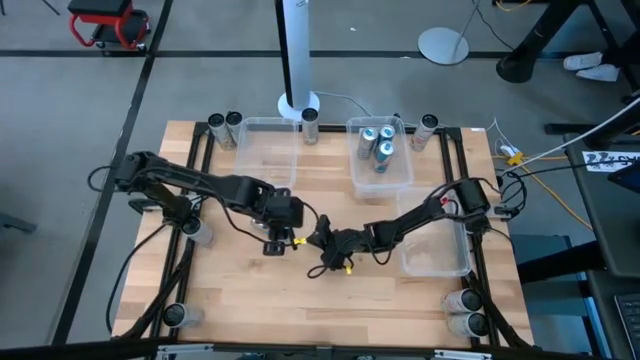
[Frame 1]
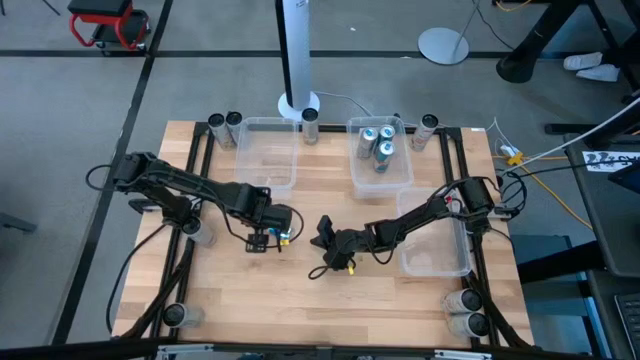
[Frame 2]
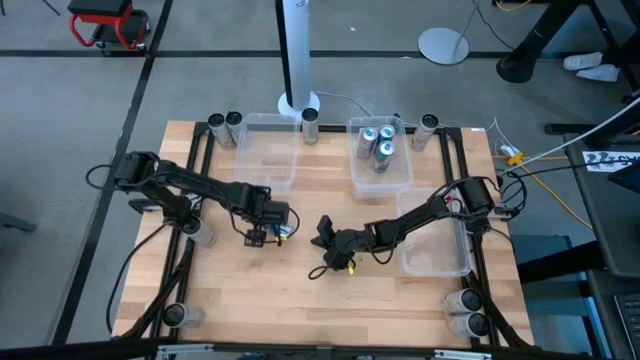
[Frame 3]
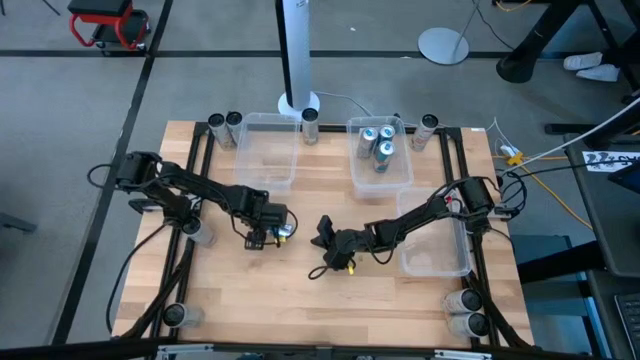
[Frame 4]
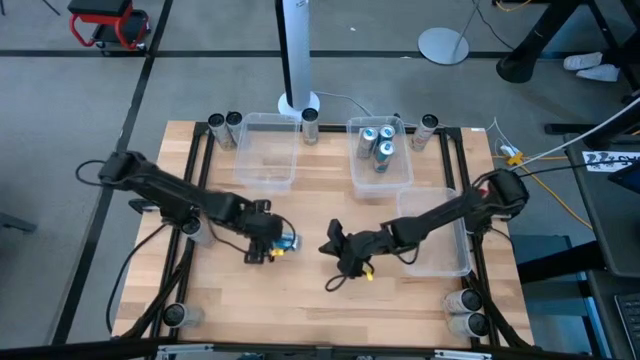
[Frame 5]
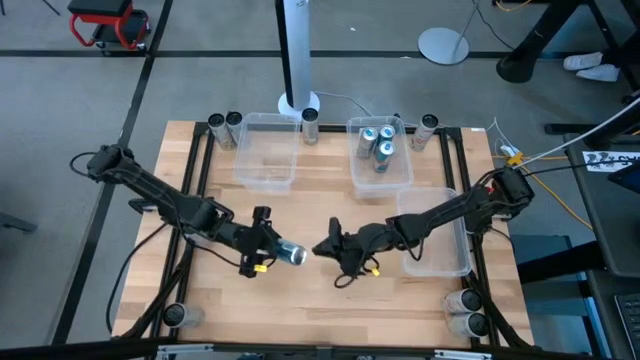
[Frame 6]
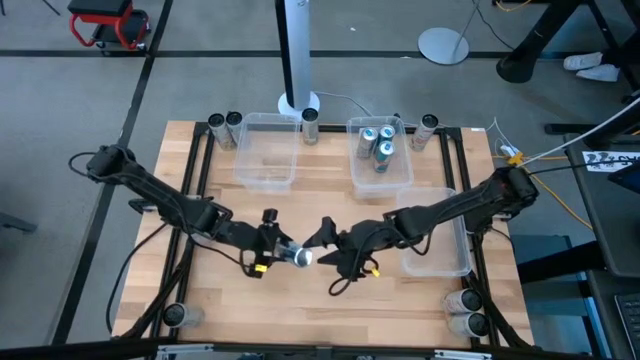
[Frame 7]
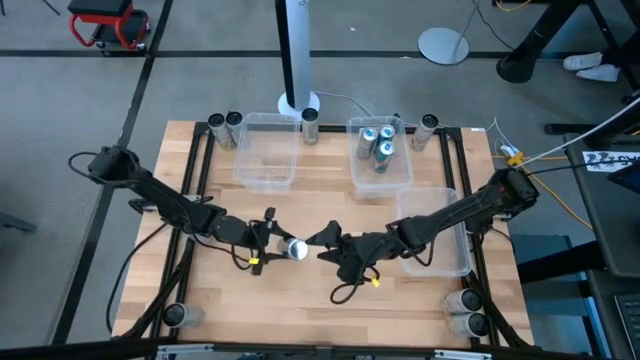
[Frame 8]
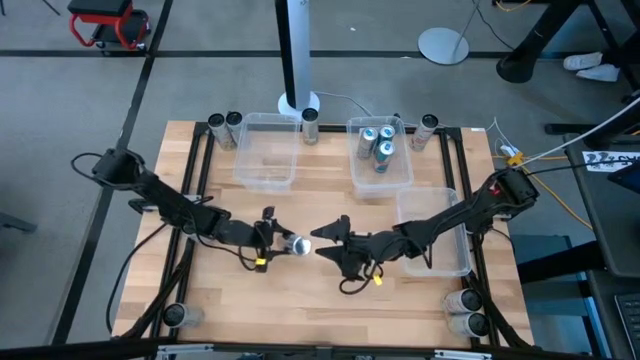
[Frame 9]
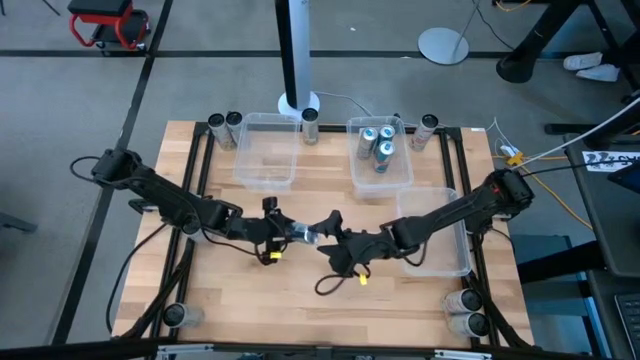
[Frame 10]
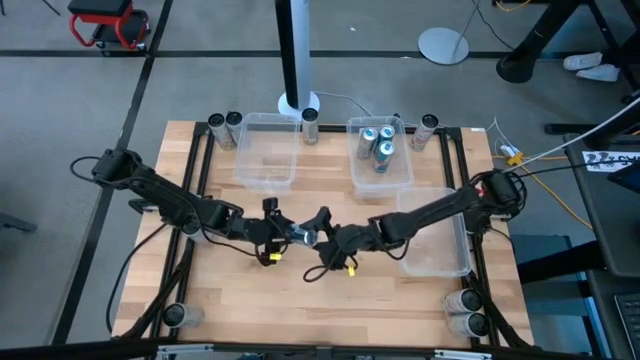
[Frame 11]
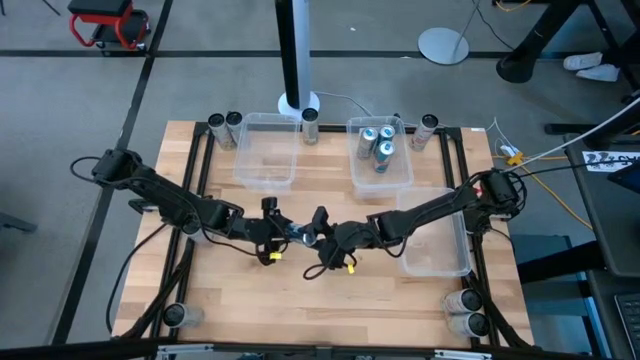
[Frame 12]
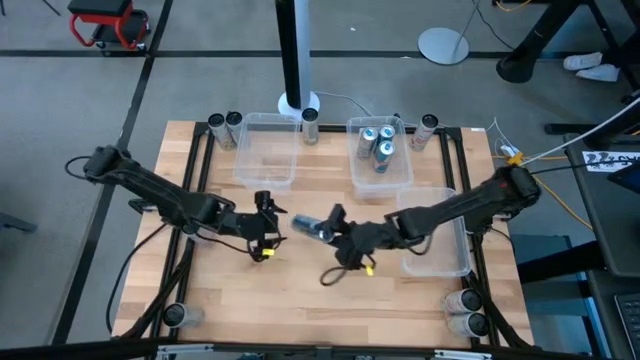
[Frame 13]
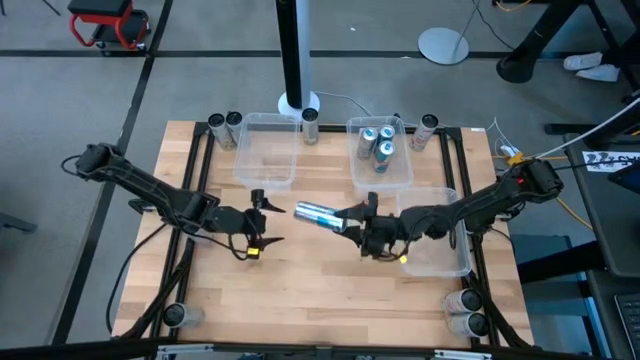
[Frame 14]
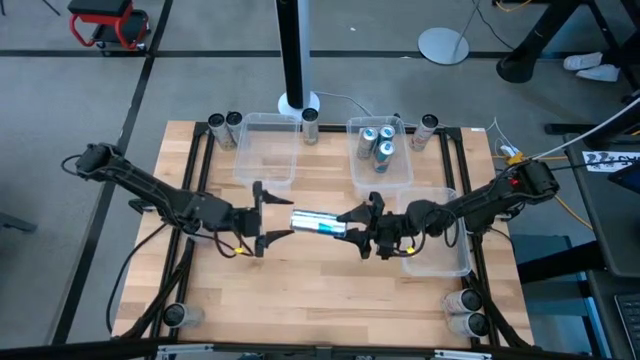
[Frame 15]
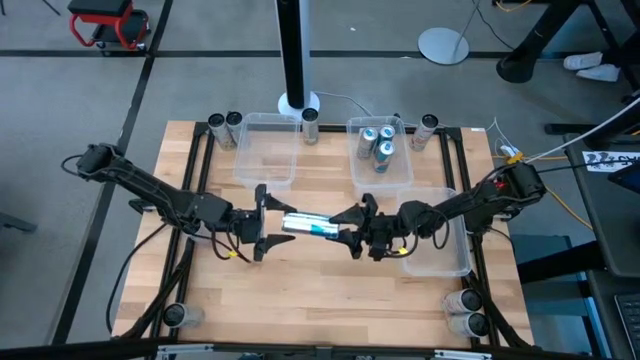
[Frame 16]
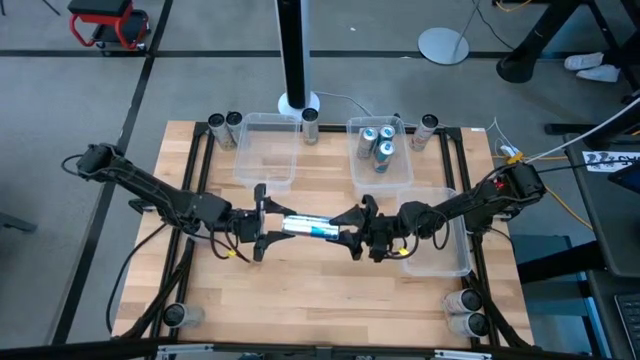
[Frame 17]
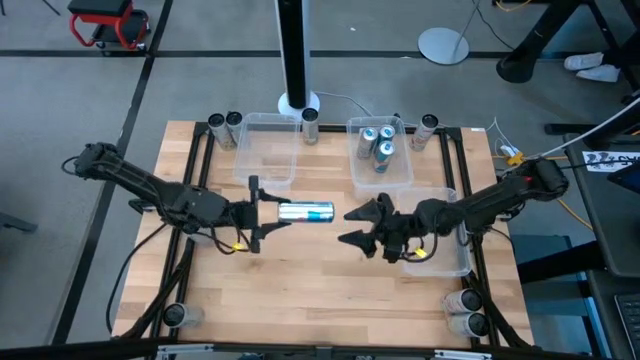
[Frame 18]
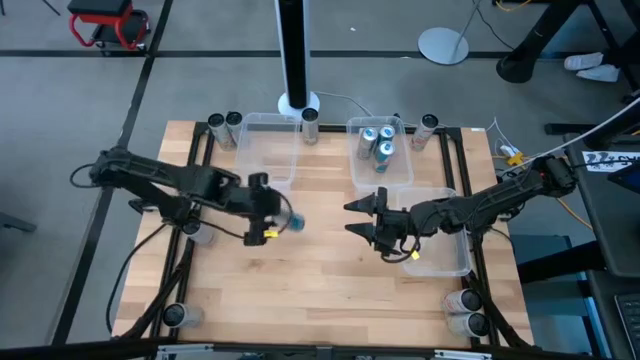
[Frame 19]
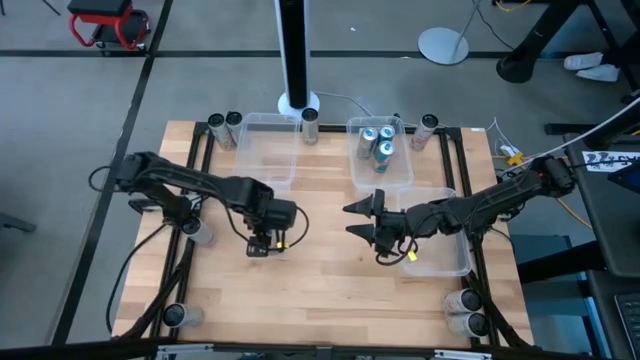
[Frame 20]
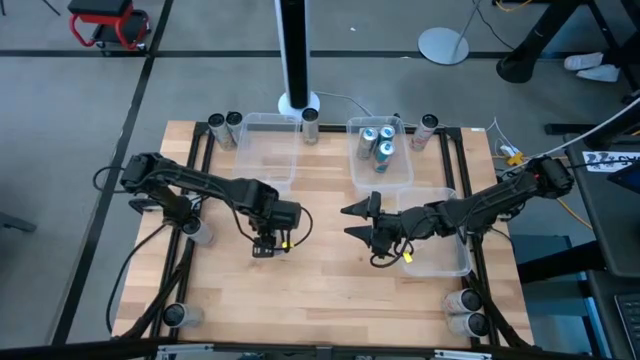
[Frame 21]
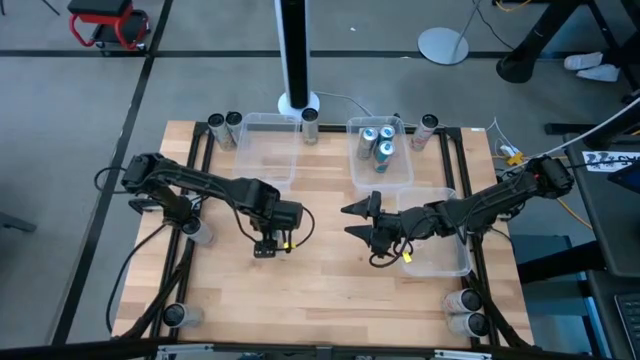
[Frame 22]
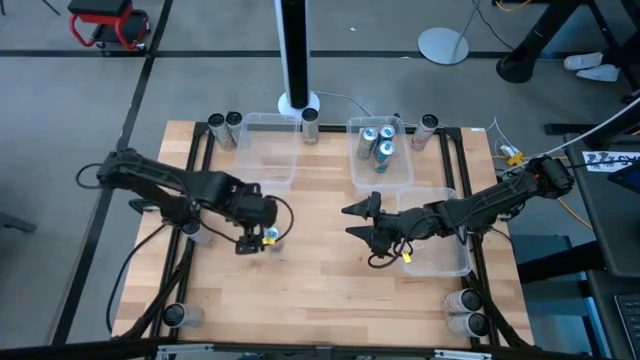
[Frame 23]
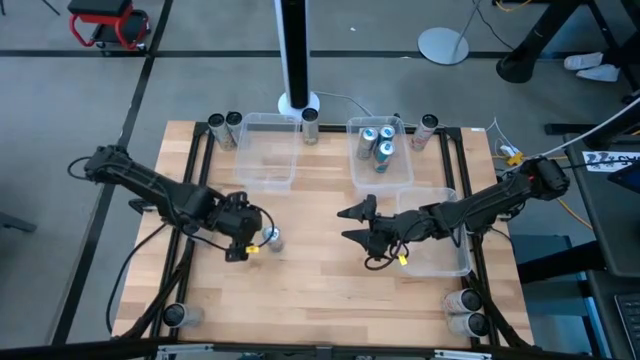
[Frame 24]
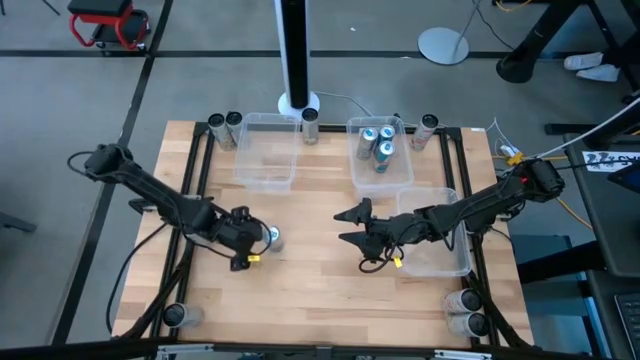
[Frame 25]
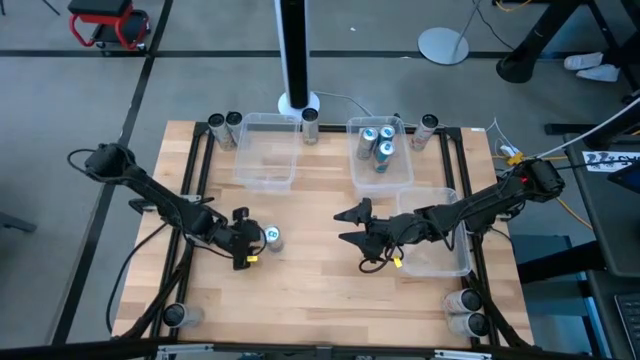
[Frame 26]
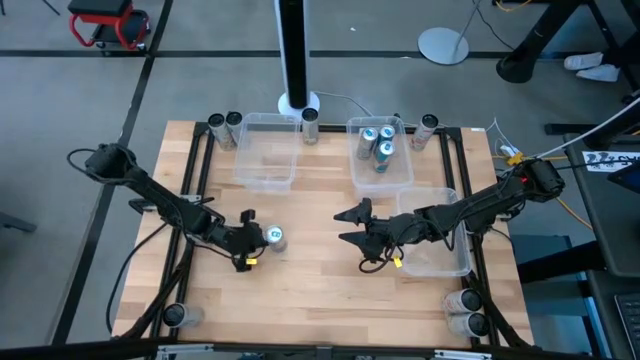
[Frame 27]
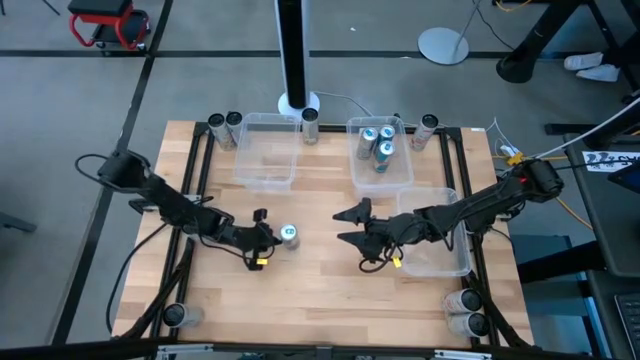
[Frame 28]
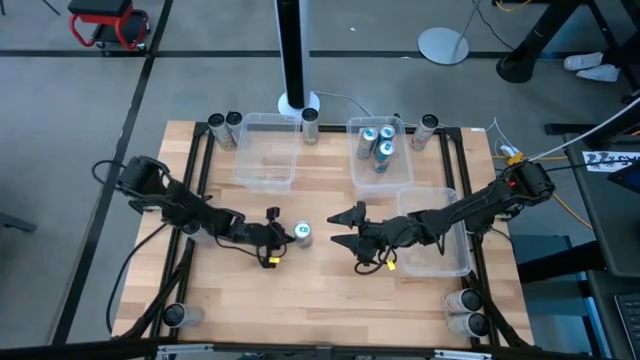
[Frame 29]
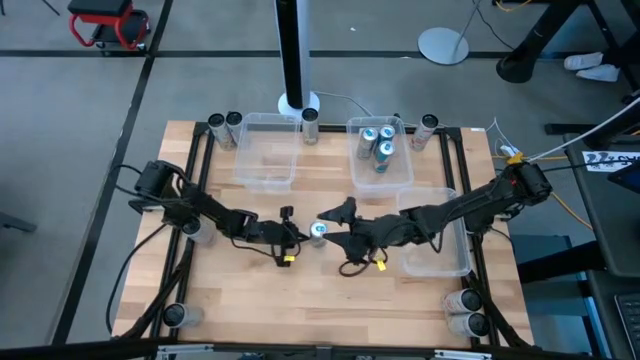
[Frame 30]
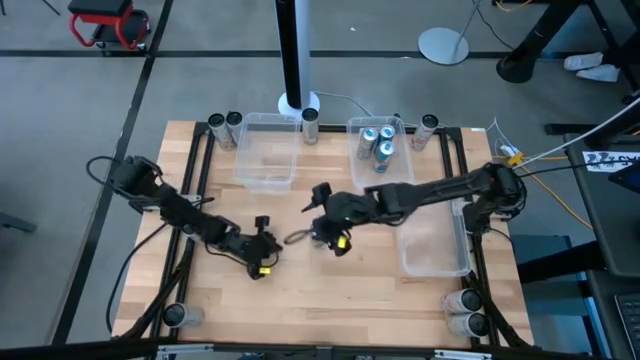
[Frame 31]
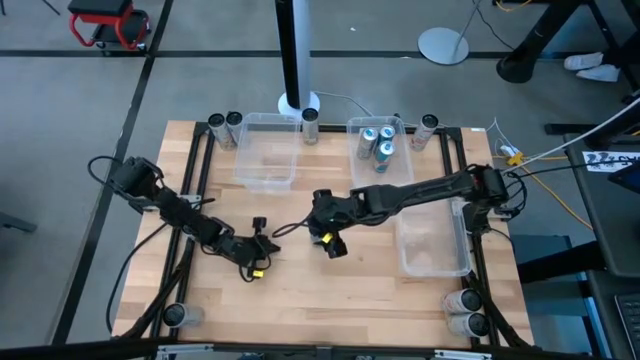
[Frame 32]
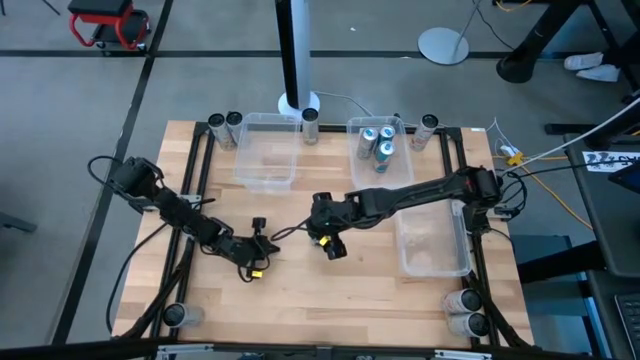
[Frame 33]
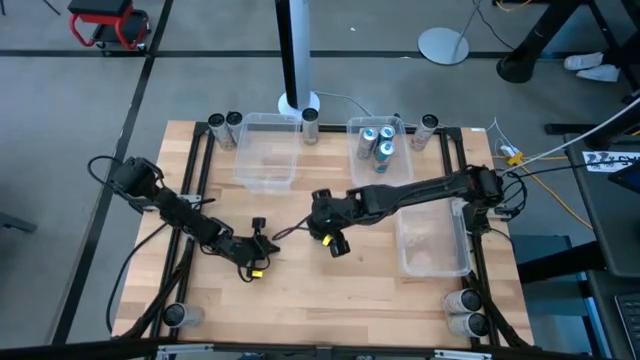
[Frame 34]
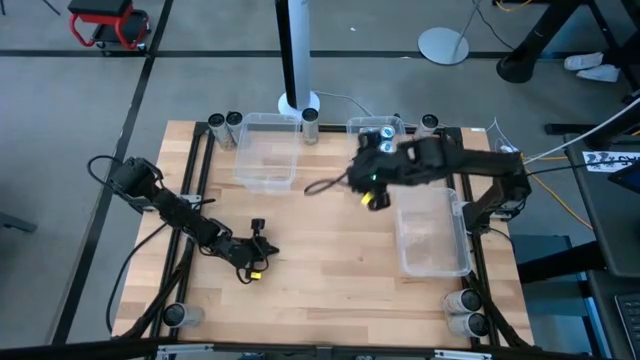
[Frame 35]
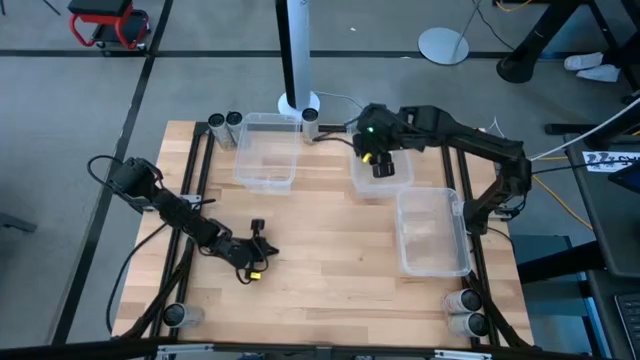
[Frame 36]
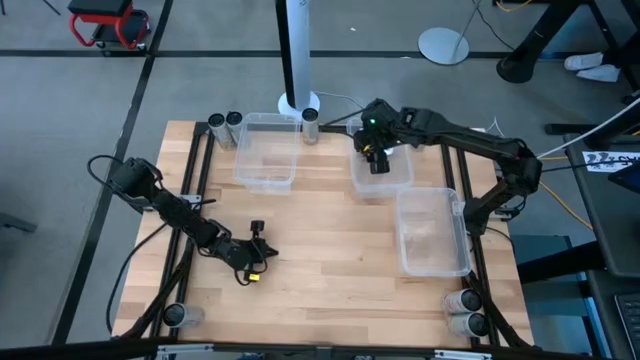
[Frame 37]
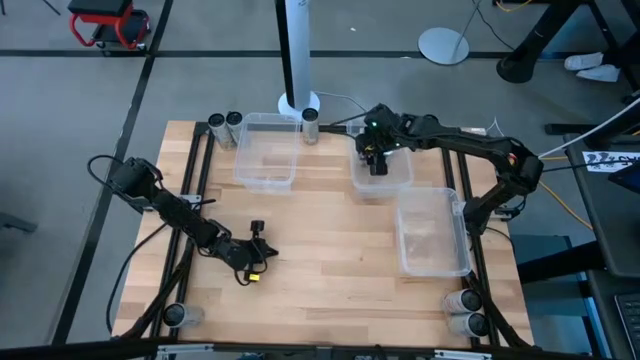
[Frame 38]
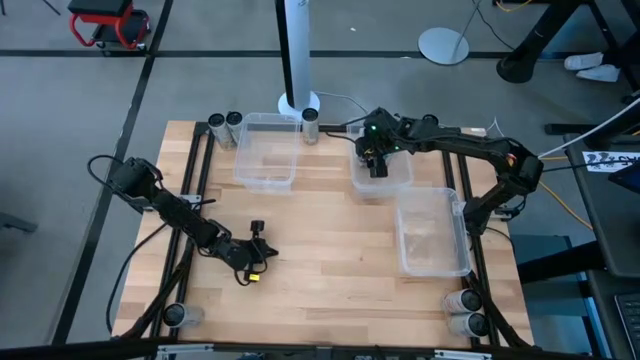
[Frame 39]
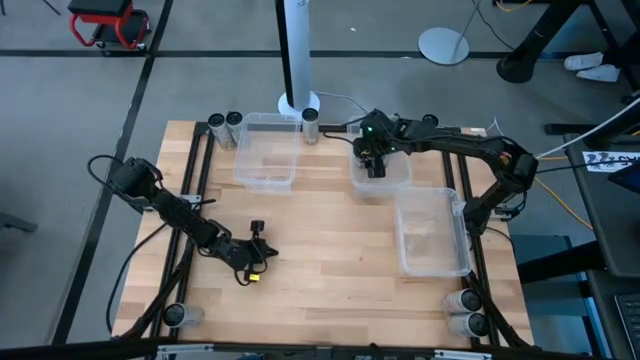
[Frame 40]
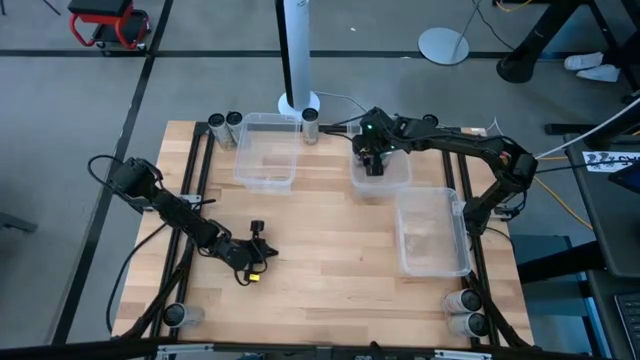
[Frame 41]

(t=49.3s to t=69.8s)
Task: Sort soda cans
Put the blue soda can into the top right transparent bin

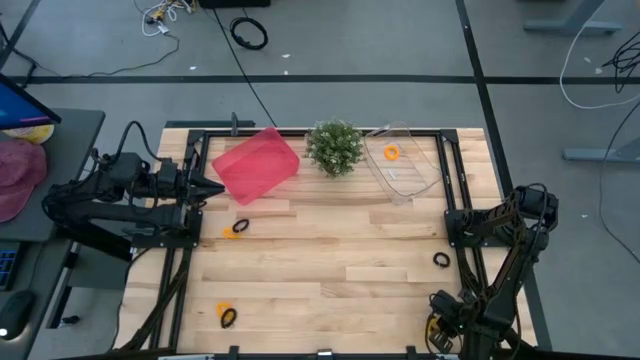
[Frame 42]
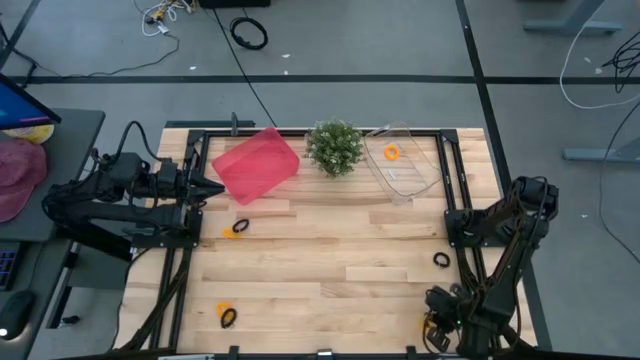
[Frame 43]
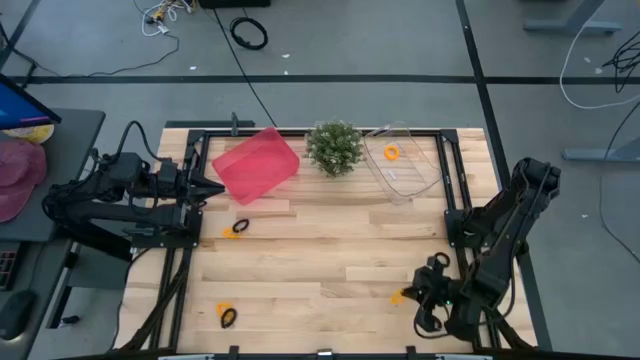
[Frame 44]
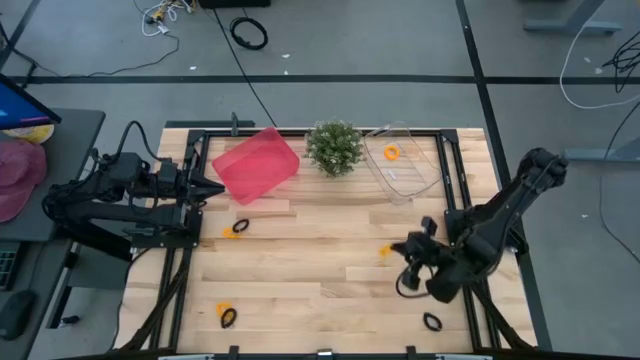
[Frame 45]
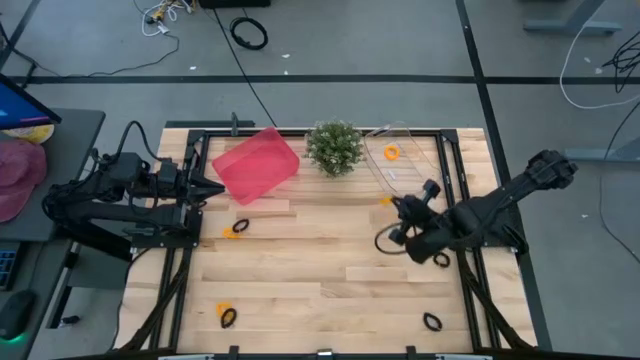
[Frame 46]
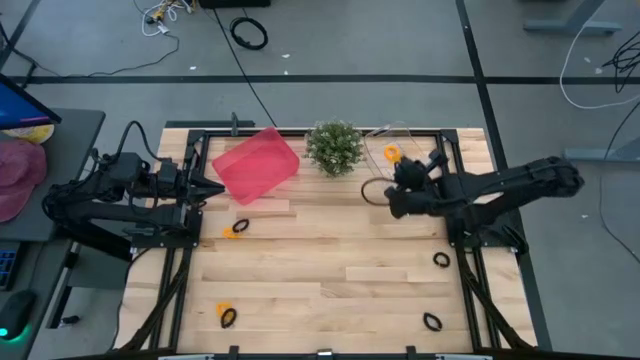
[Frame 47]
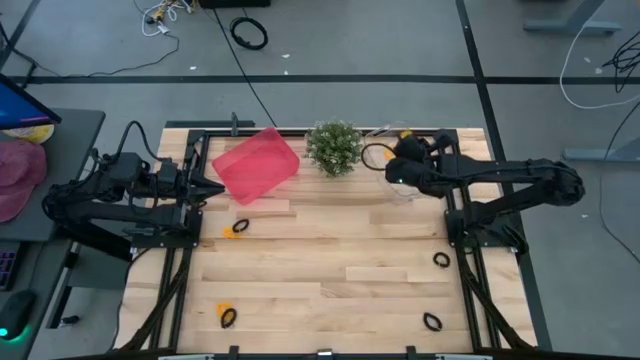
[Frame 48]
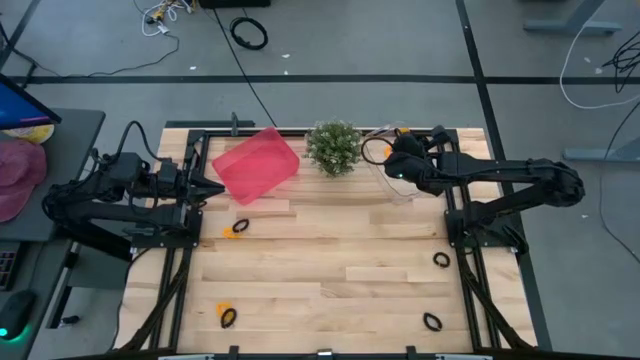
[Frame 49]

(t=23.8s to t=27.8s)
Task: Sort spring keychains
Put the yellow spring keychain into the transparent bin
